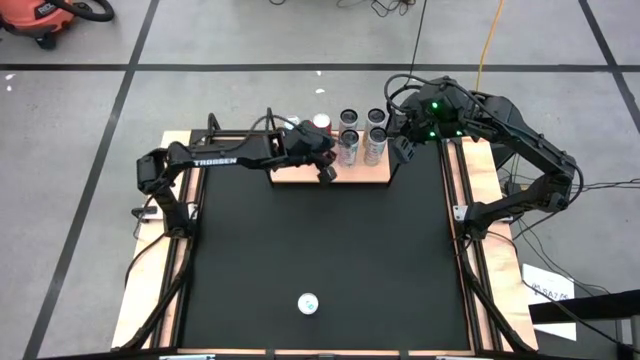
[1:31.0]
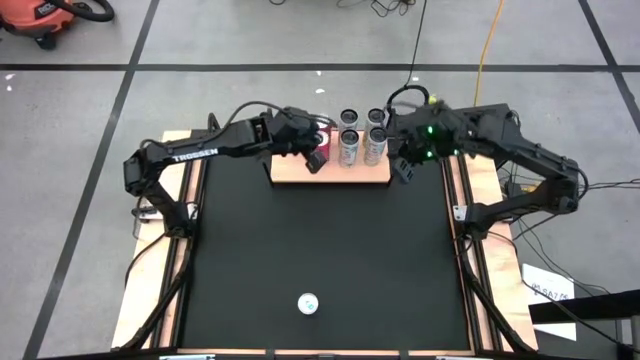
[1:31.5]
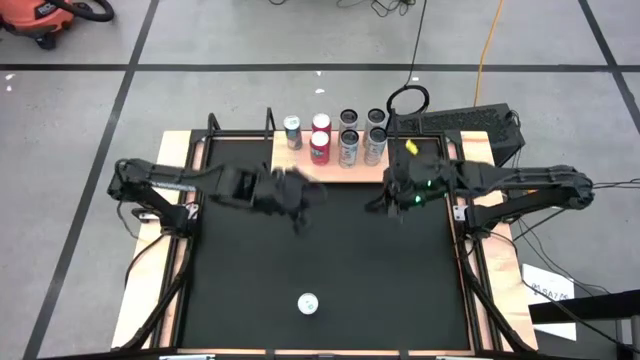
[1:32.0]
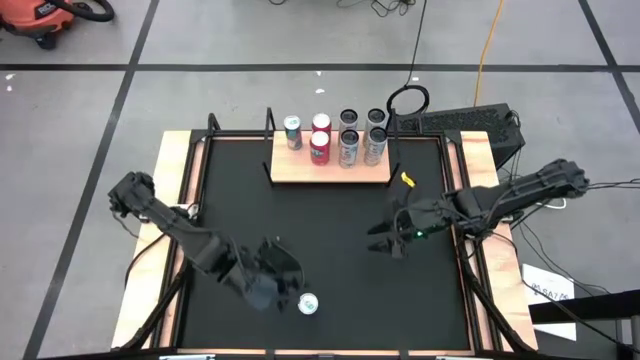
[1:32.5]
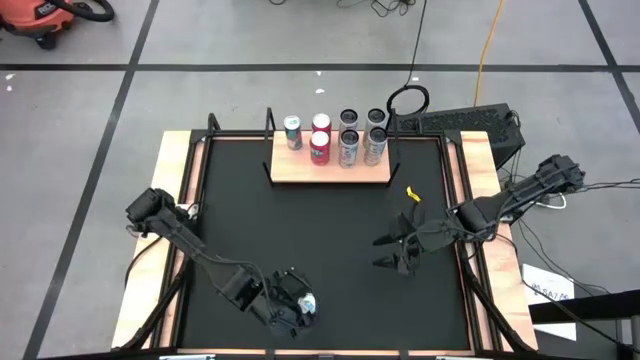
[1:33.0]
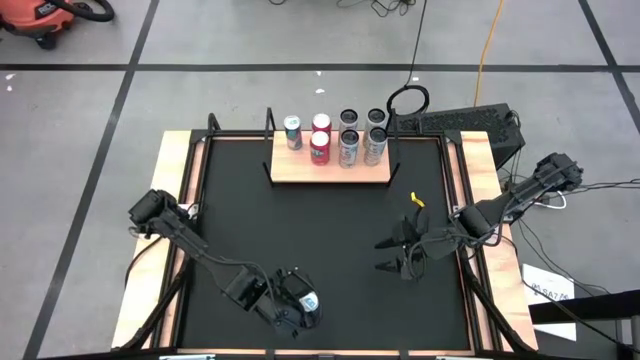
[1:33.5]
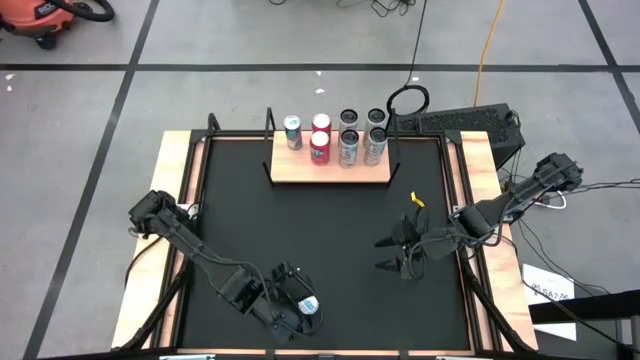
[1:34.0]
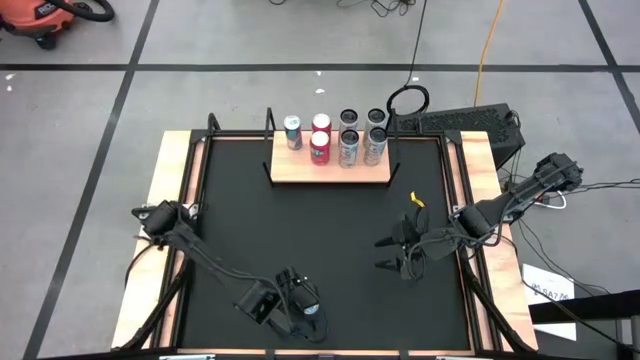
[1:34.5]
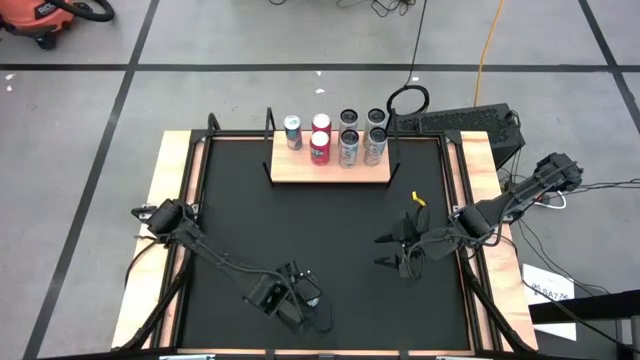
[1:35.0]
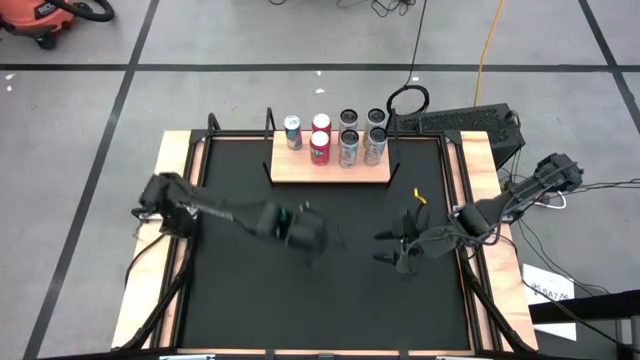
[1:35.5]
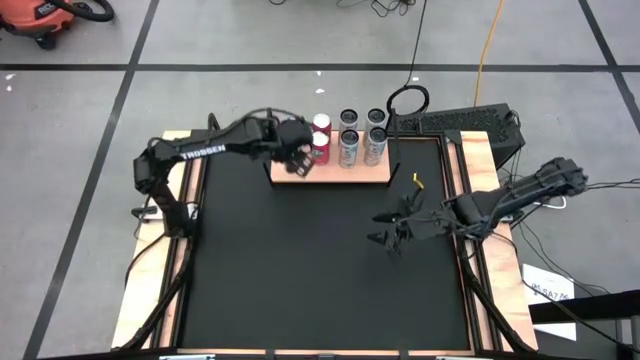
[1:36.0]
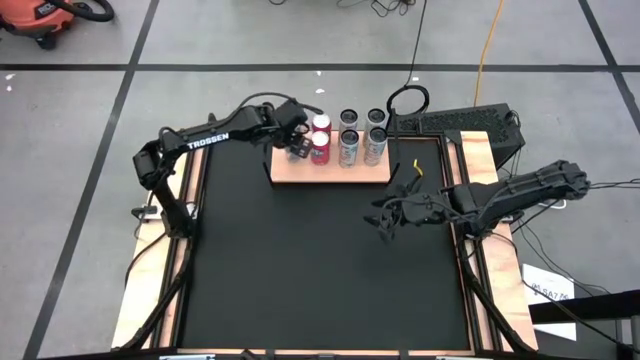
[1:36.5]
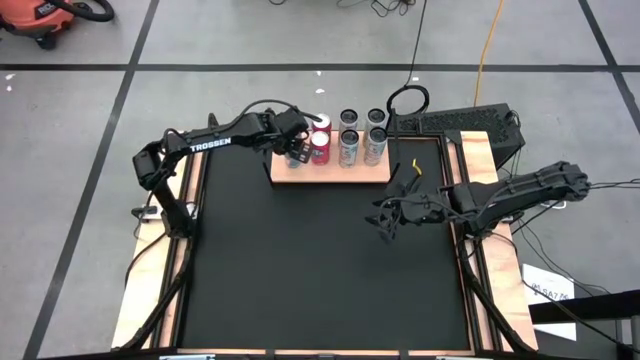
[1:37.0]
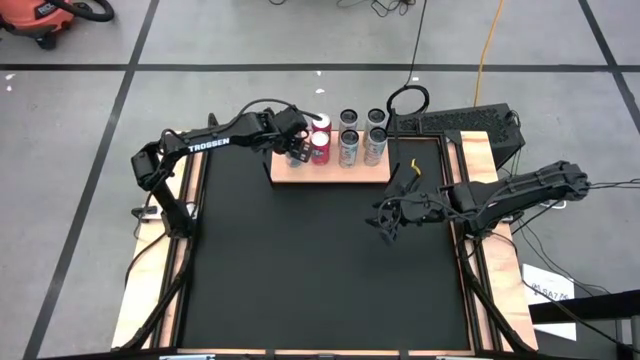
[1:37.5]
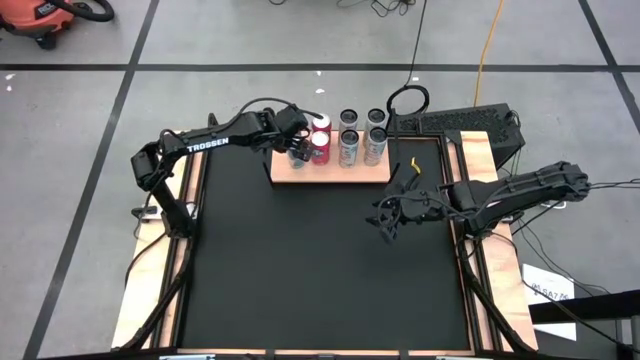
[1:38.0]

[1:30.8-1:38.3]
Task: Place canned beverage on shelf
Put the blue can on the shelf aligned with the other blue soda can

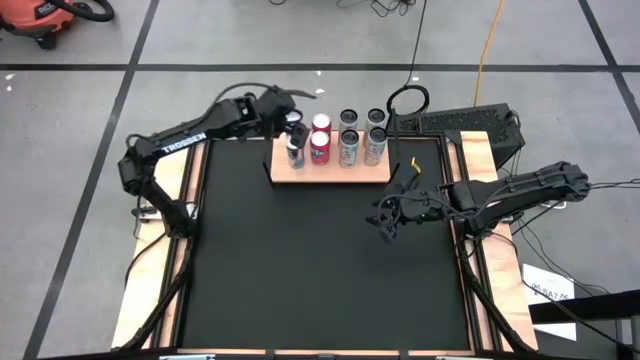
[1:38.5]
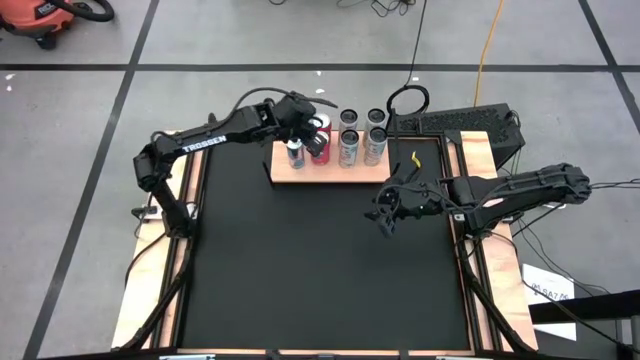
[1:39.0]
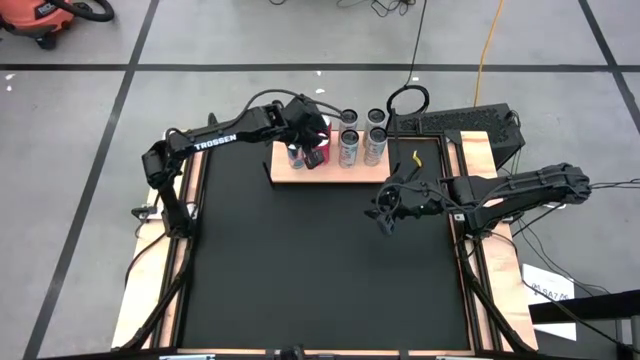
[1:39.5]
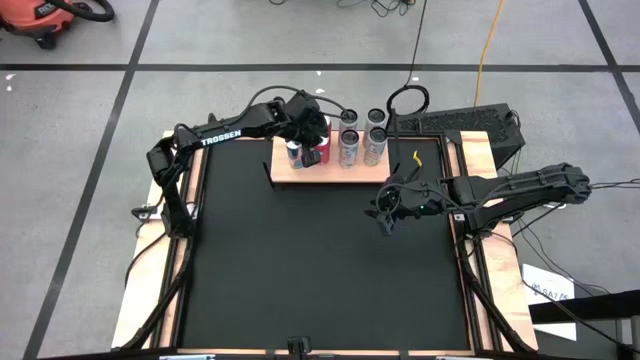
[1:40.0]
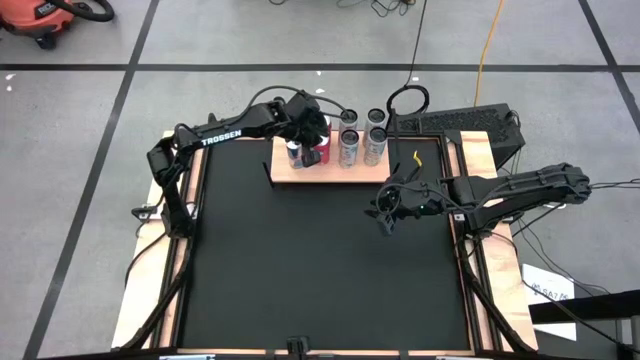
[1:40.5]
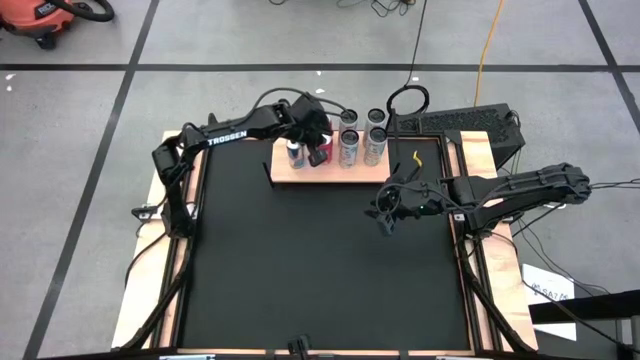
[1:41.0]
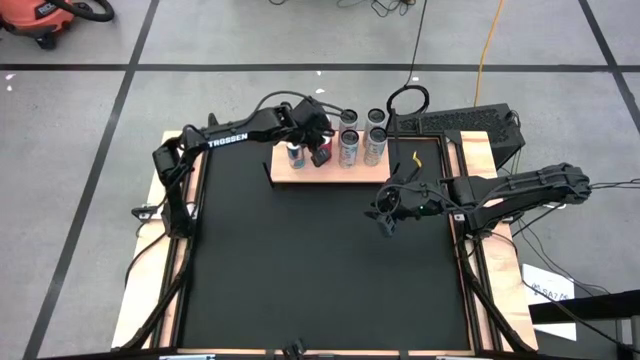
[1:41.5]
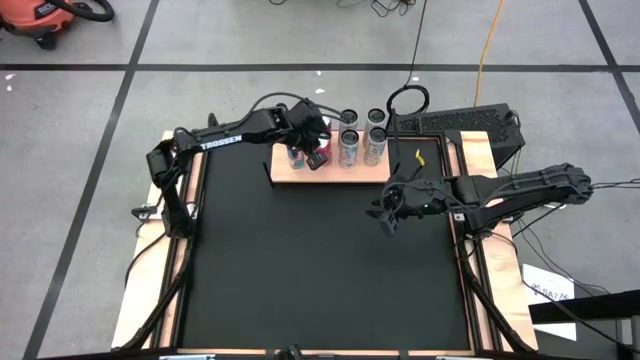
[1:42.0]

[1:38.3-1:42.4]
Adjust the front orange soda can on the shelf

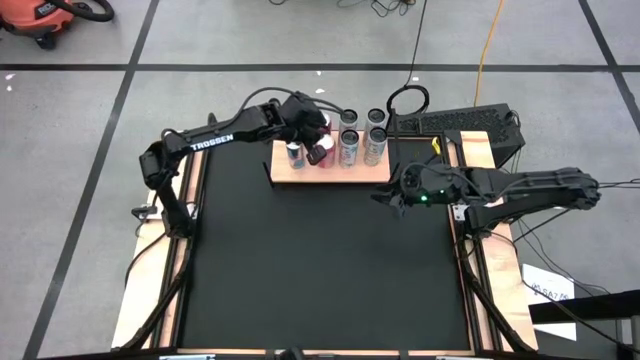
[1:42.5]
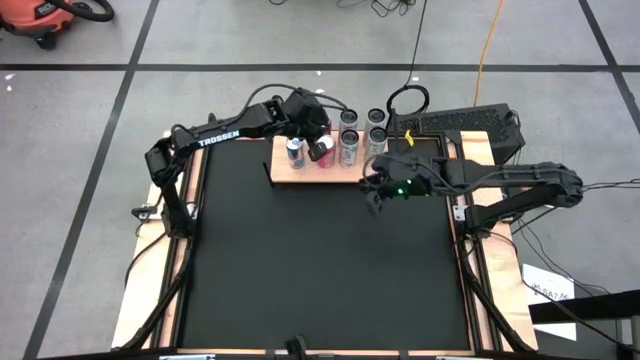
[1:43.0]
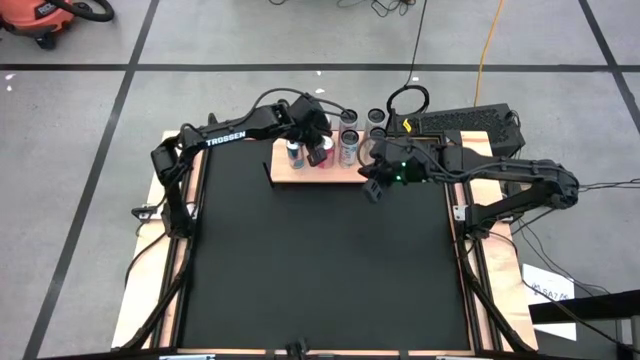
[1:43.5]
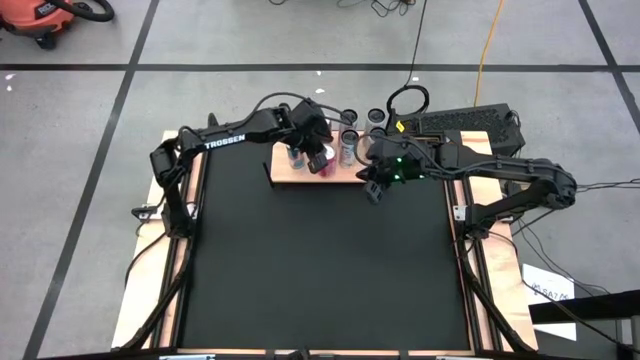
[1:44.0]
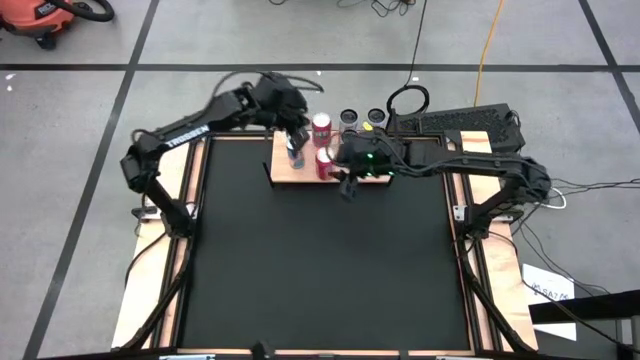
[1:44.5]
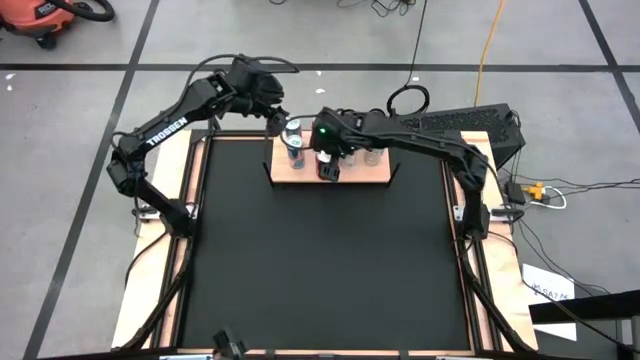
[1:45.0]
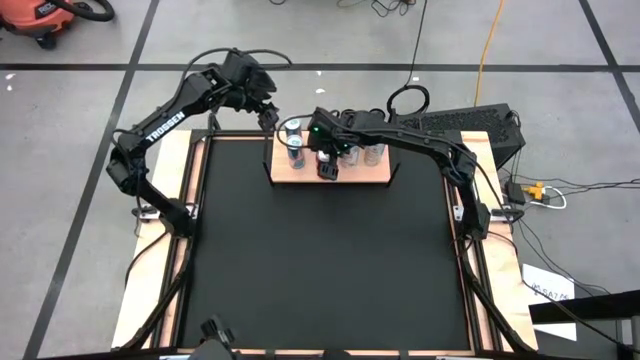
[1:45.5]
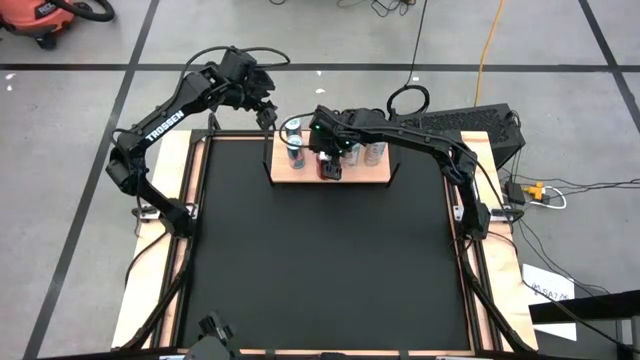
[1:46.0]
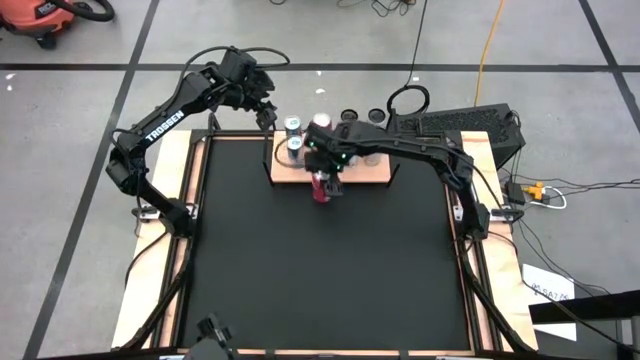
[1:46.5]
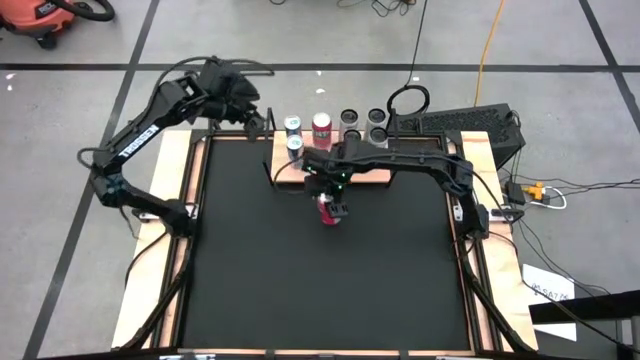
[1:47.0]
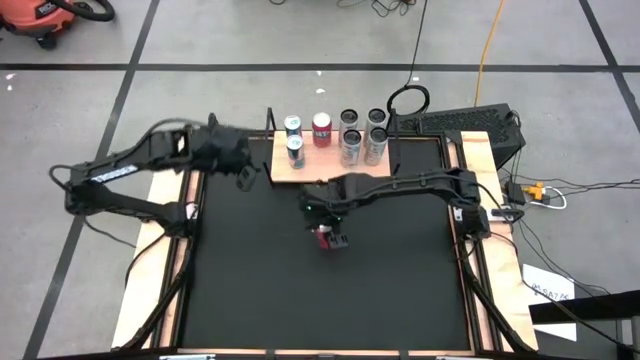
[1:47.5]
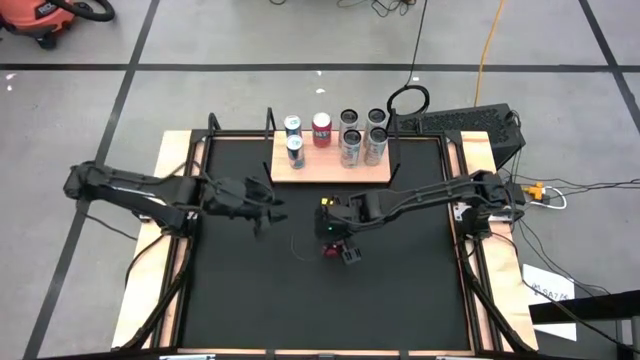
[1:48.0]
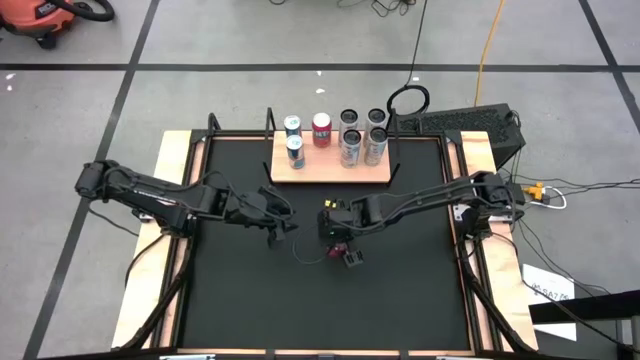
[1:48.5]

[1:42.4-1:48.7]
Remove the front orange soda can from the shelf

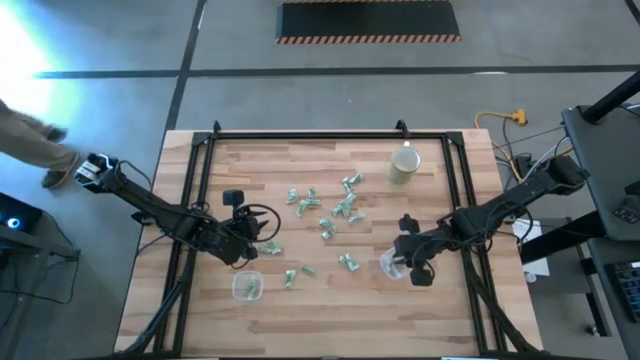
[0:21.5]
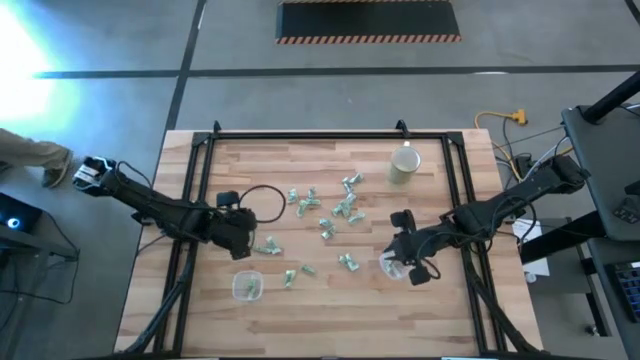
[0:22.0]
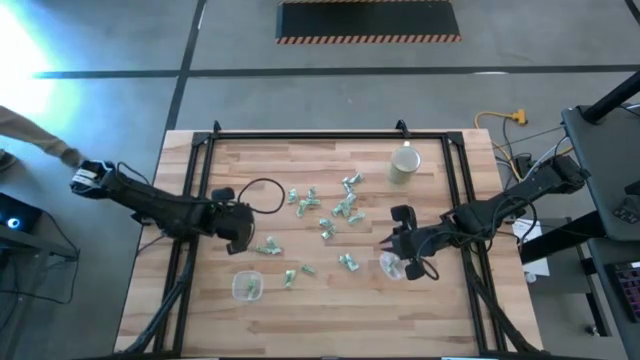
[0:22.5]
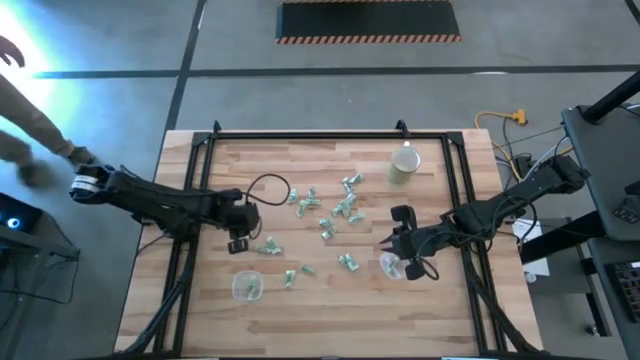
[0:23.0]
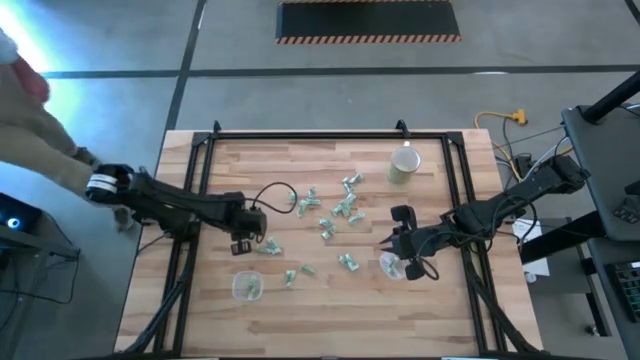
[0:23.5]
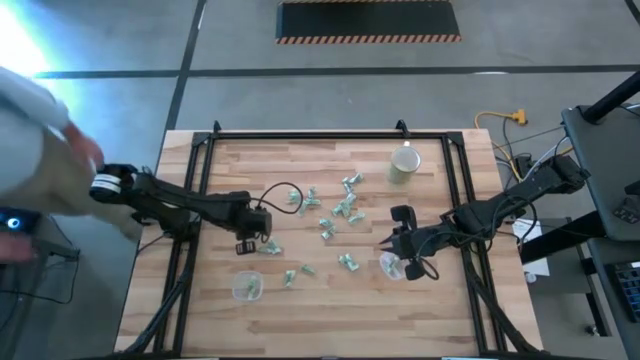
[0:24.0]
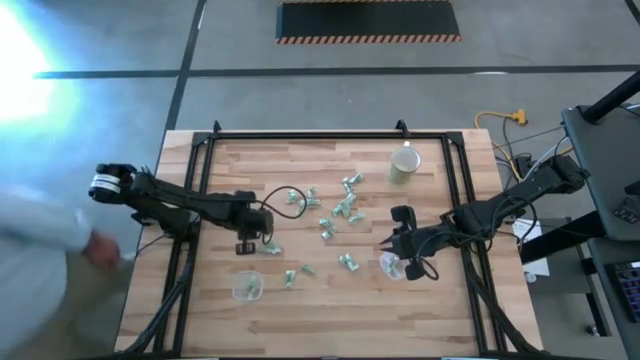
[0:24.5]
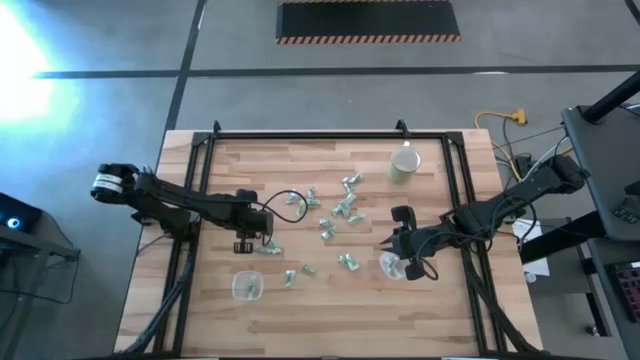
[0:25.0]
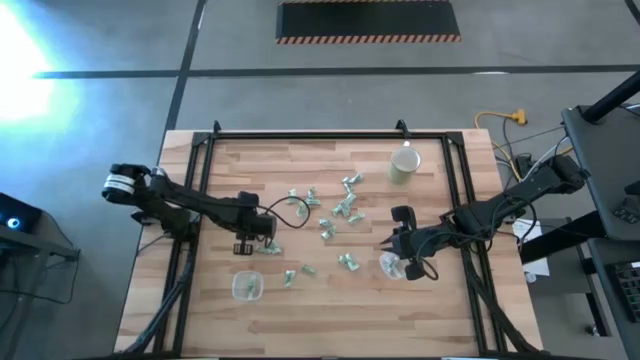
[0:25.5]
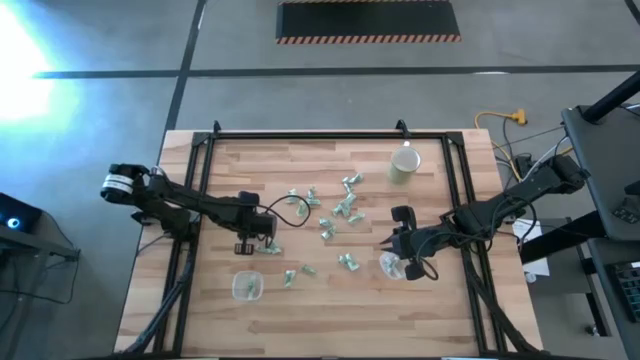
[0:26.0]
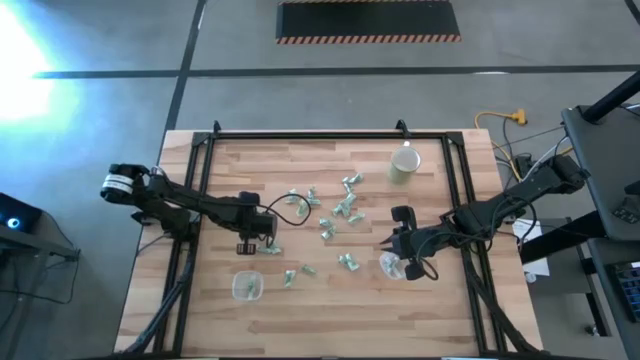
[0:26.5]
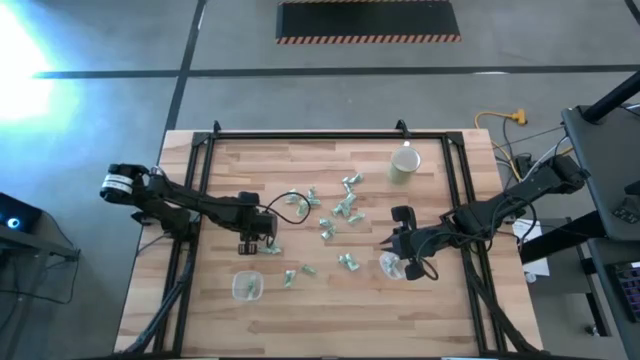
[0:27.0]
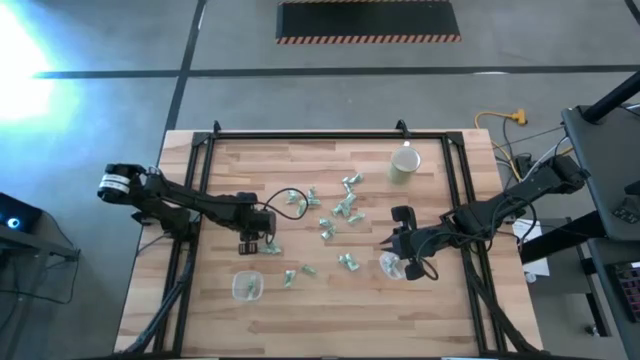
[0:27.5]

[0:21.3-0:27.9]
Task: Pick and place Stevia / Truvia into bins
Put the stevia packet into the left transparent container
